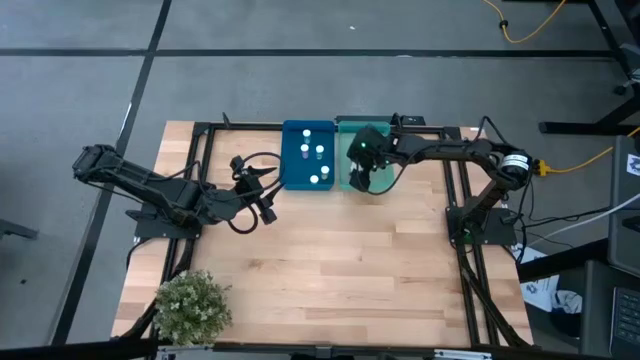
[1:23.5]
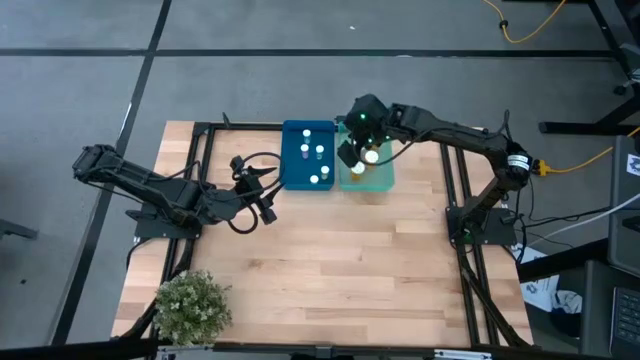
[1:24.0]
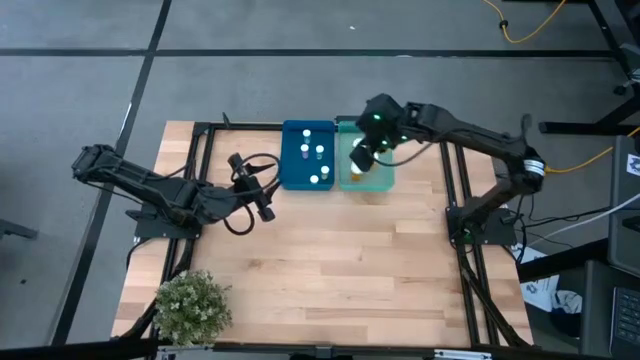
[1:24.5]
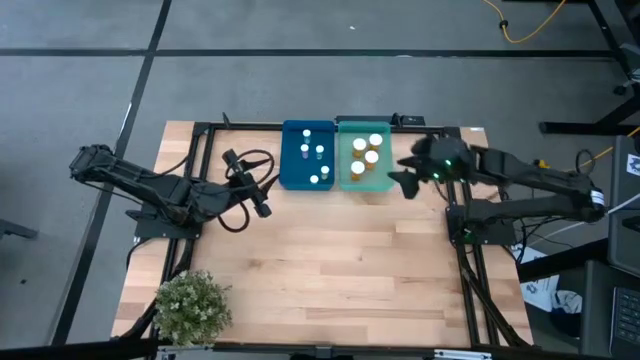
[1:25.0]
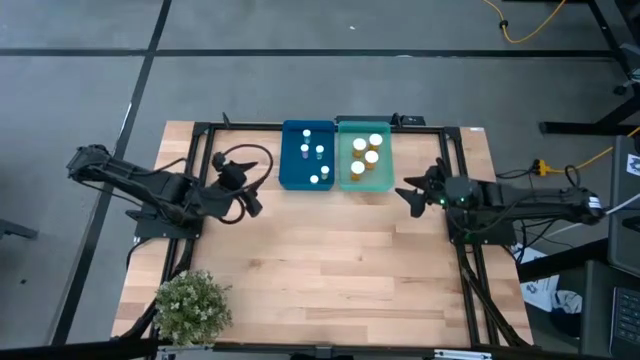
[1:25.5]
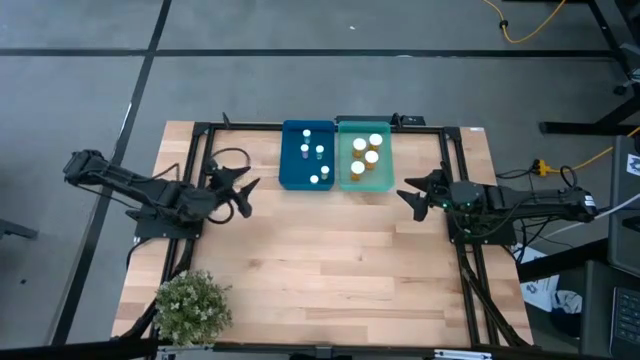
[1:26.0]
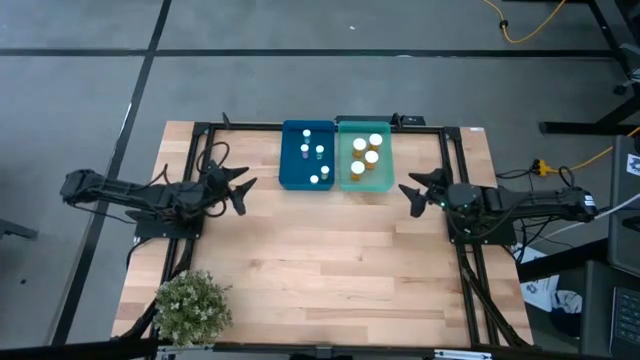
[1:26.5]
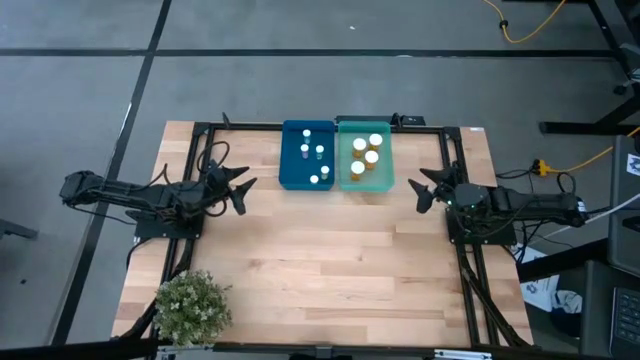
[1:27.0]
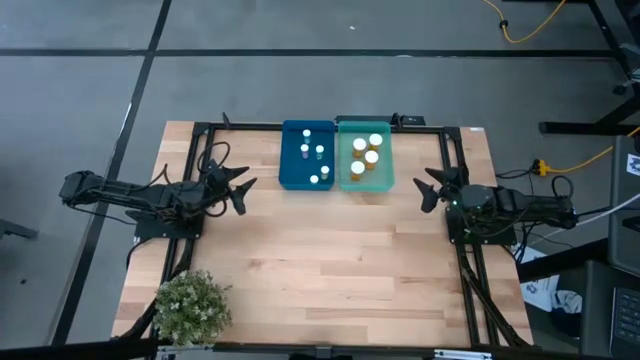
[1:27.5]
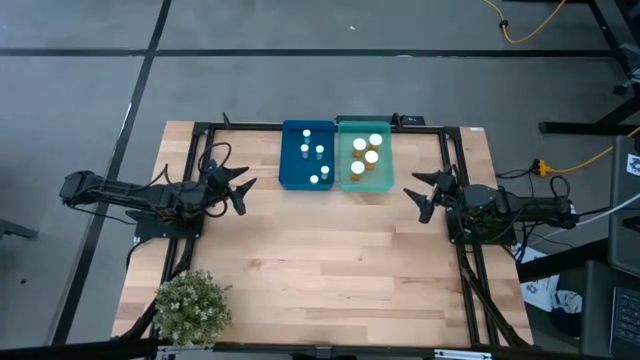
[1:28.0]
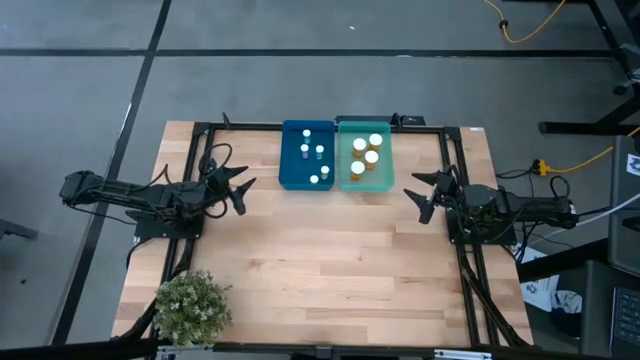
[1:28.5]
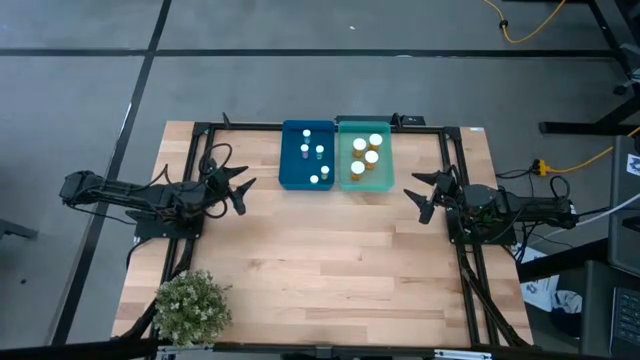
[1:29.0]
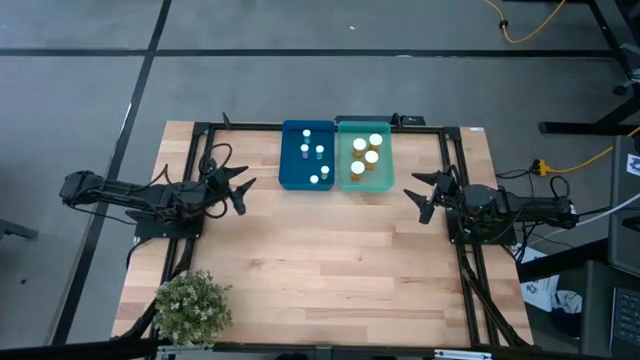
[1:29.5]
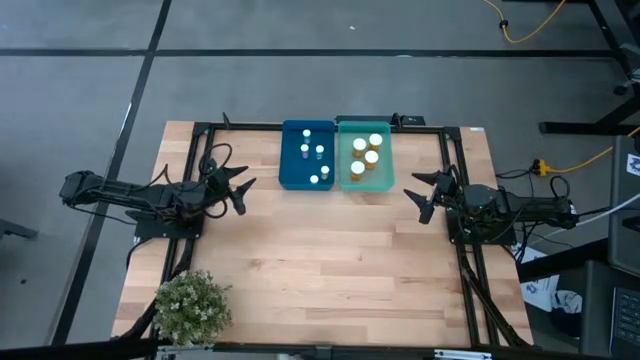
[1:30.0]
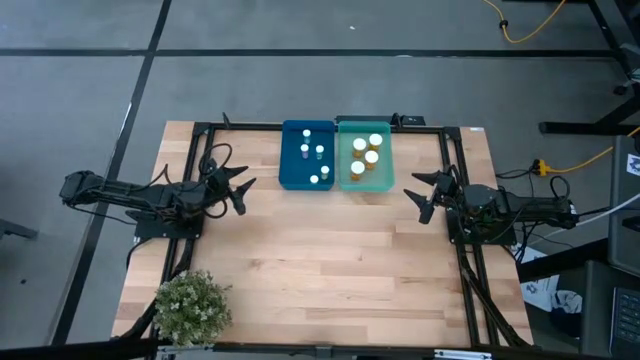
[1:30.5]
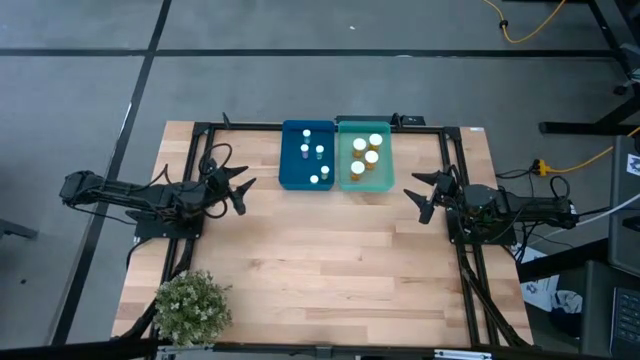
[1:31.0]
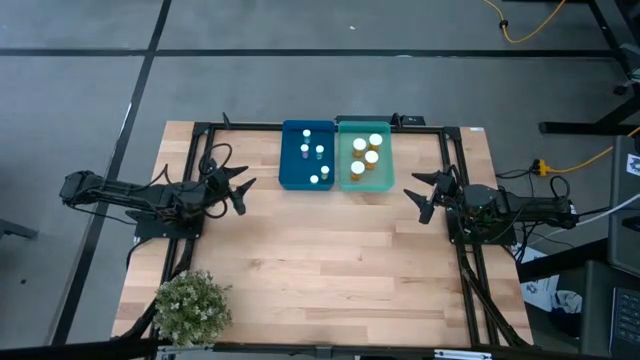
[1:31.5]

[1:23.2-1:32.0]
Task: Pick and place medicine bottles into bin by pill shape (circle, oval)
Return to Home Position

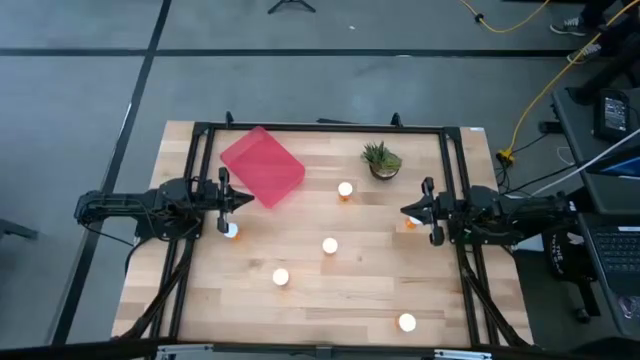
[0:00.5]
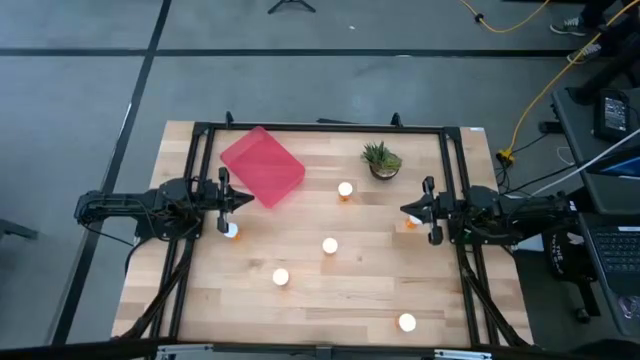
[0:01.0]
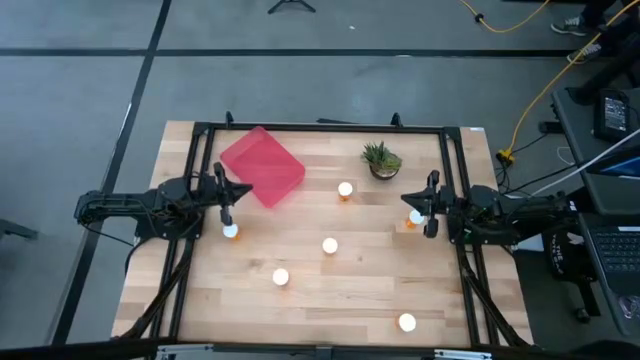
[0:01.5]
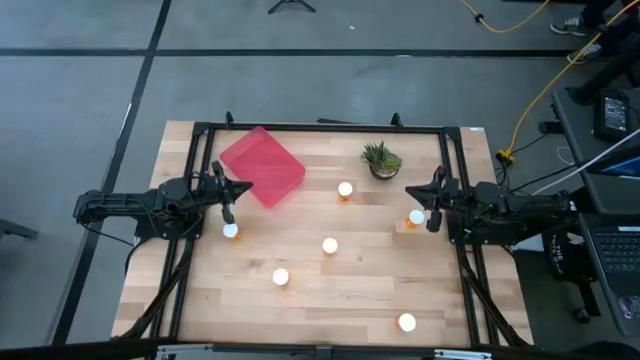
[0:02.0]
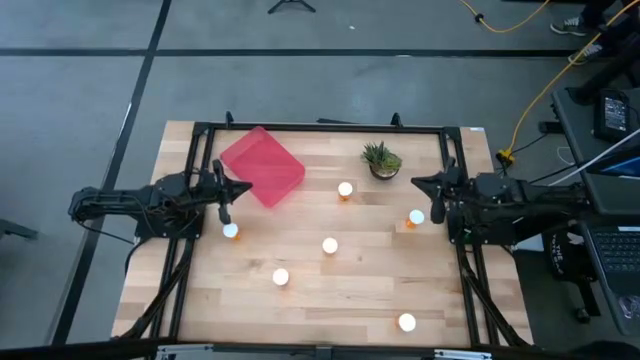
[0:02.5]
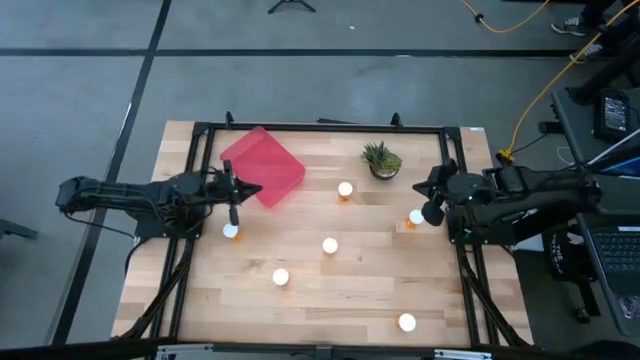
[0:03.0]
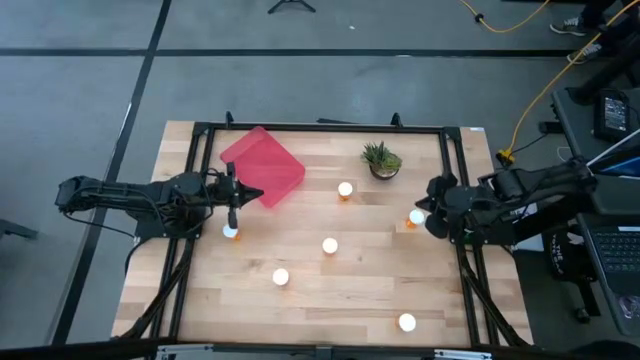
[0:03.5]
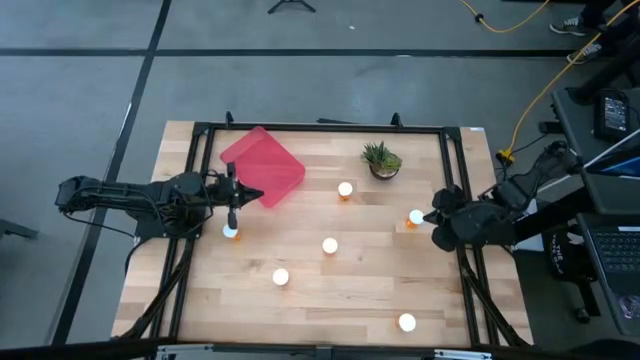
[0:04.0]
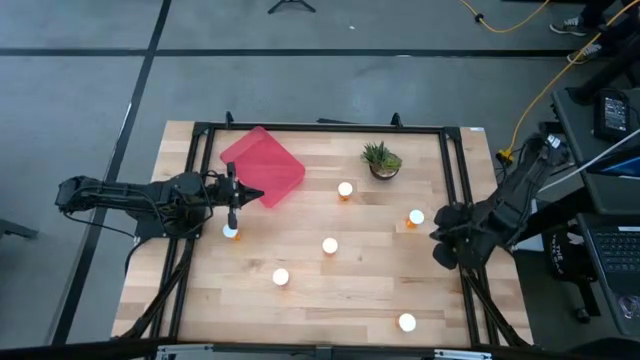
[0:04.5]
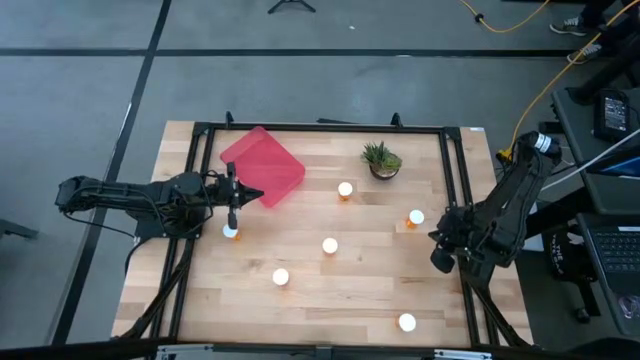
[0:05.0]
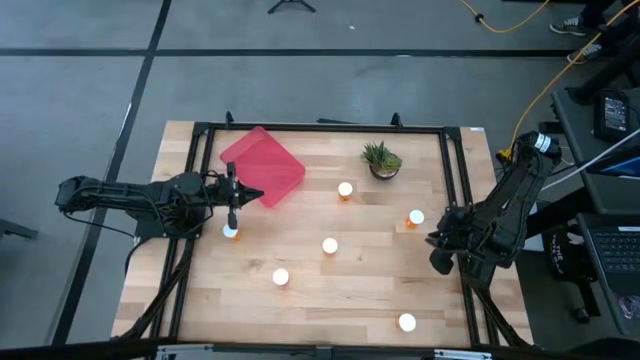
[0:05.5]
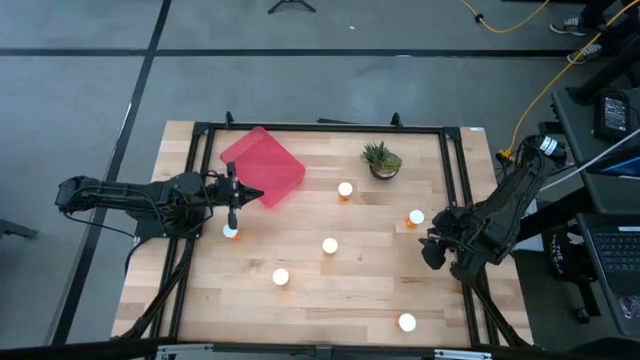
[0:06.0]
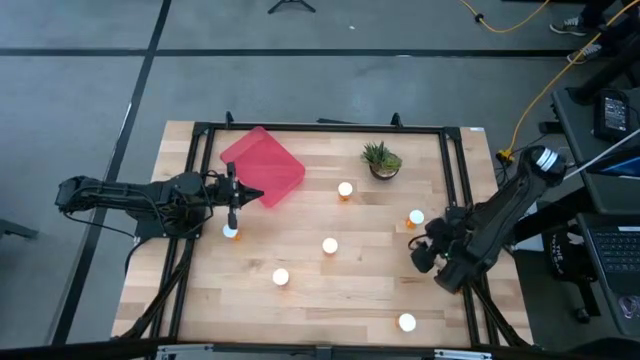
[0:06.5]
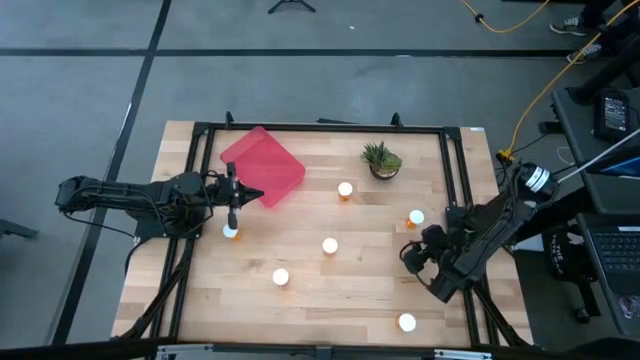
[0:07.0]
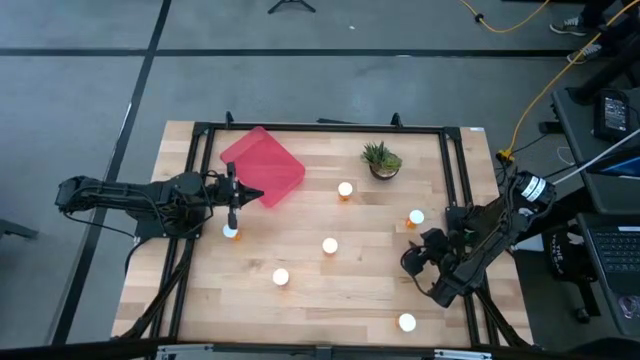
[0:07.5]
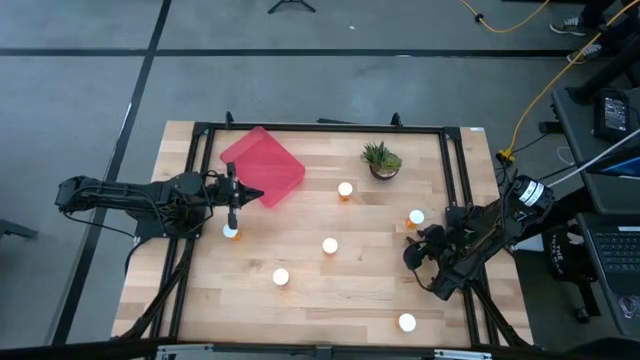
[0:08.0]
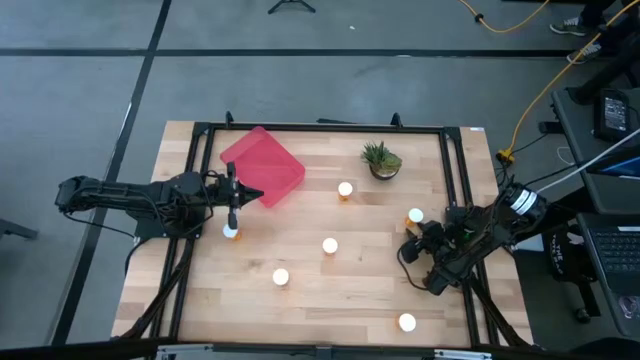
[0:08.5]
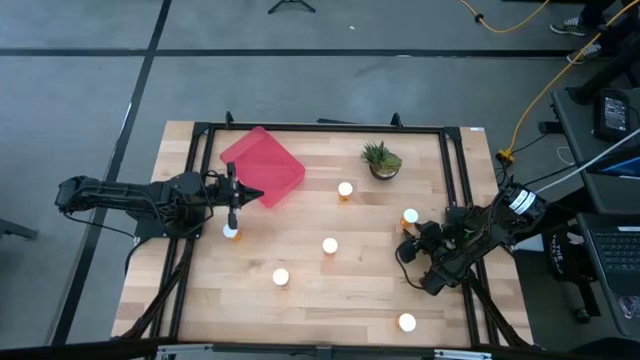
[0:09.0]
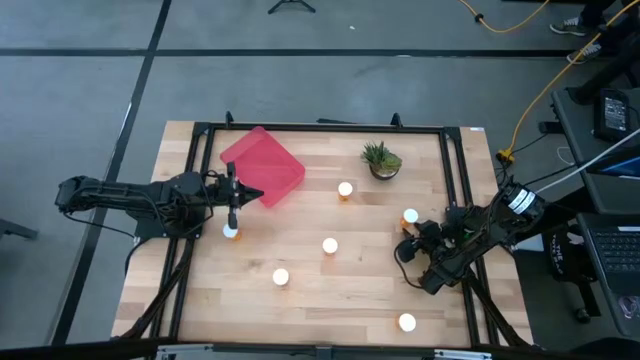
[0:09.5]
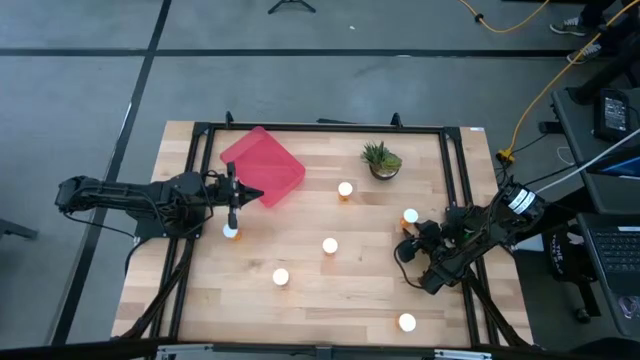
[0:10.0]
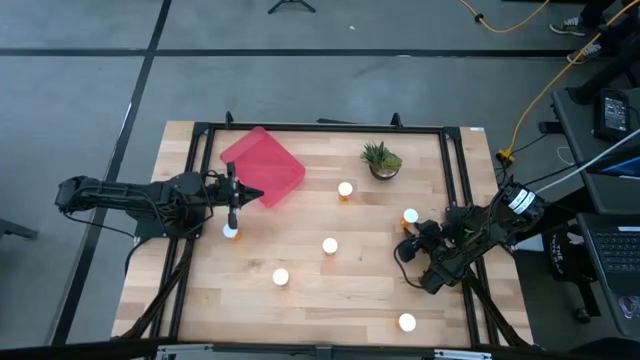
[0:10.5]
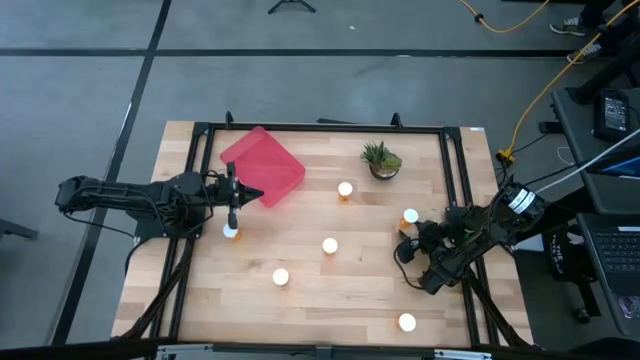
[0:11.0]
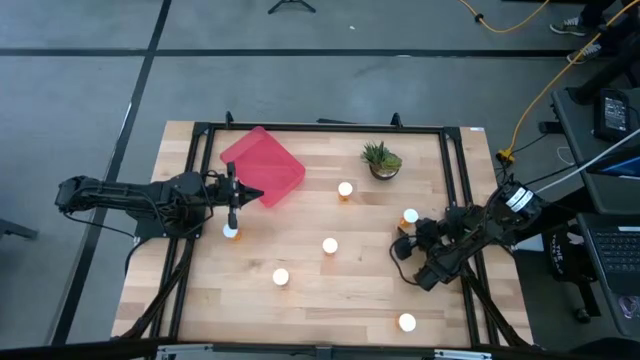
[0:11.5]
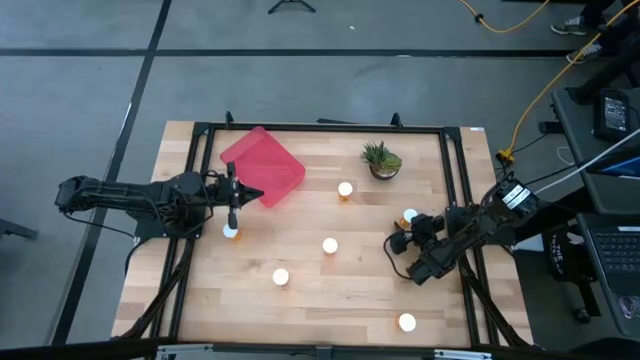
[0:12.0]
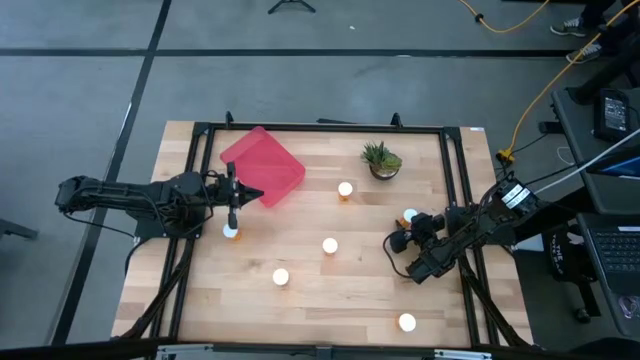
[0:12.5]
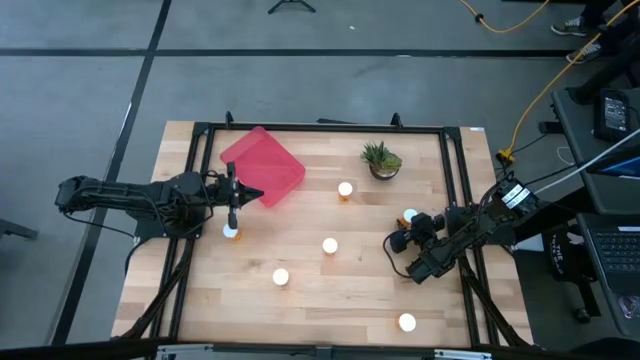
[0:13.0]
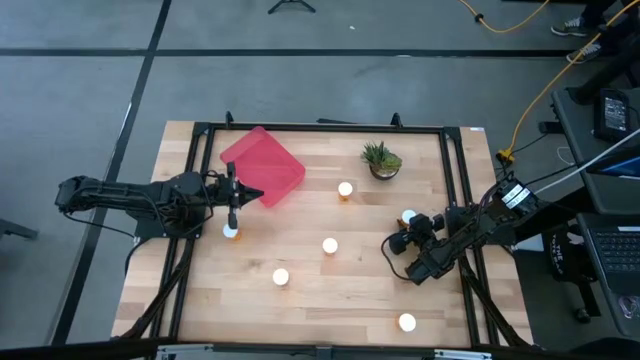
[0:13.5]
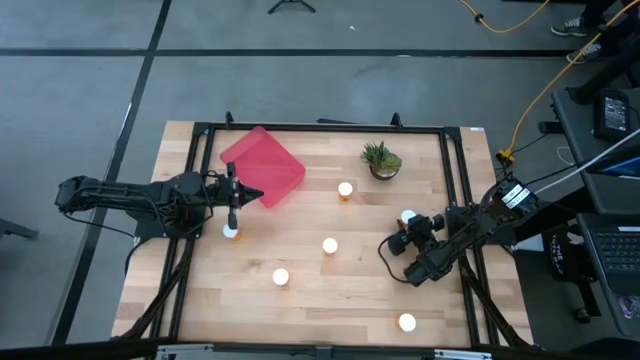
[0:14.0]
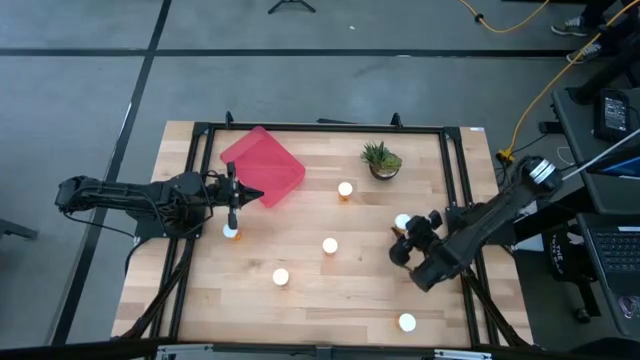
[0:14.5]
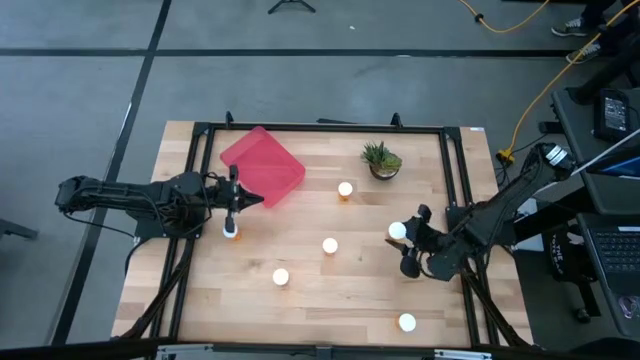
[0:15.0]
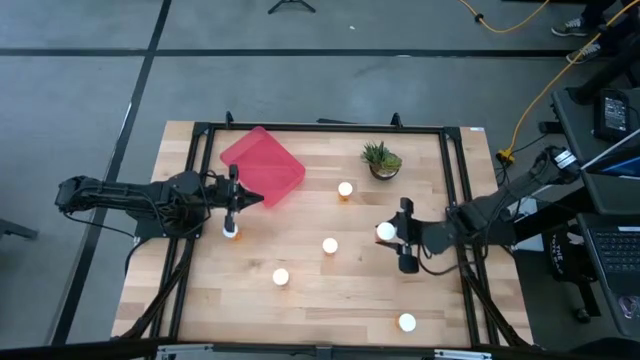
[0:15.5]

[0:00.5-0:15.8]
Task: Pick and place pill bottles into a basket
Put the orange pill bottle into the red container
